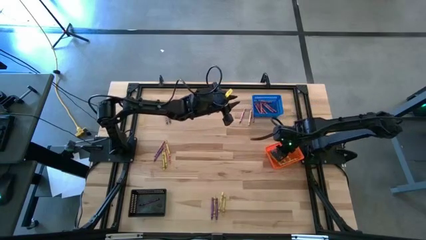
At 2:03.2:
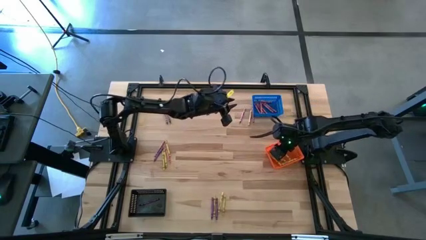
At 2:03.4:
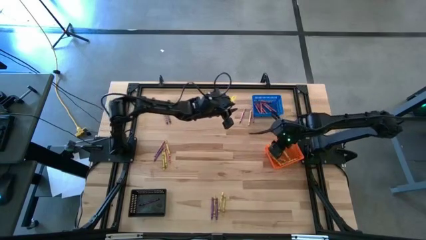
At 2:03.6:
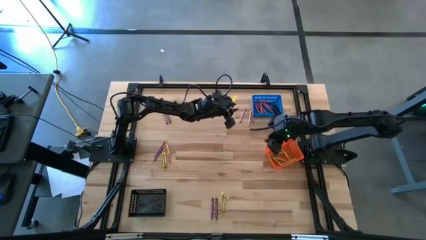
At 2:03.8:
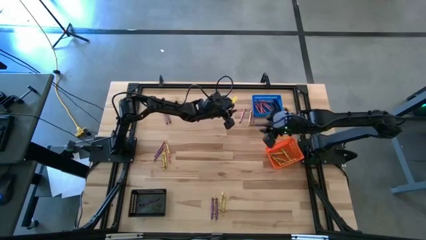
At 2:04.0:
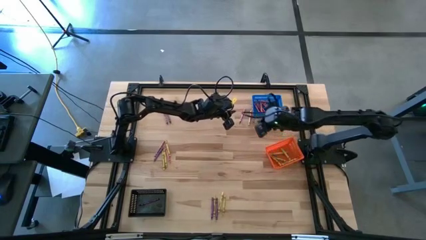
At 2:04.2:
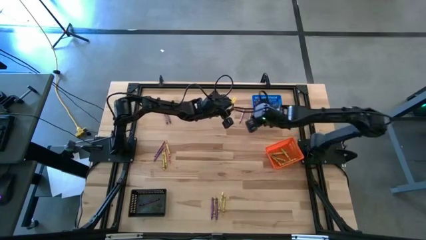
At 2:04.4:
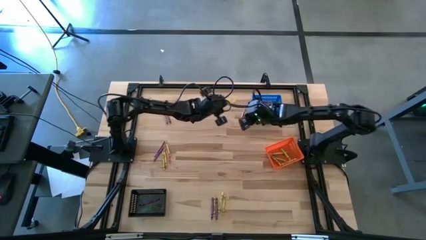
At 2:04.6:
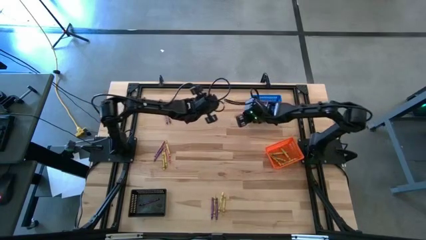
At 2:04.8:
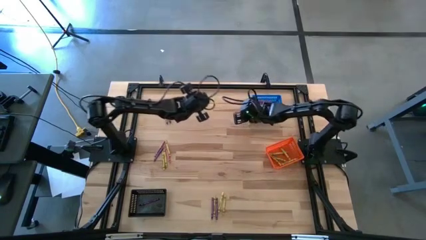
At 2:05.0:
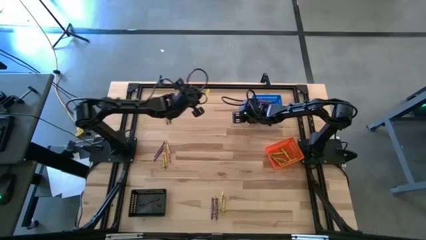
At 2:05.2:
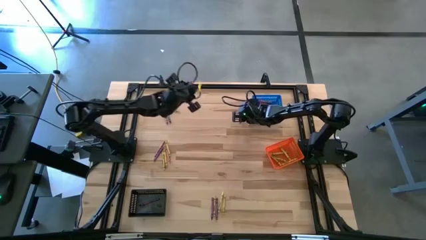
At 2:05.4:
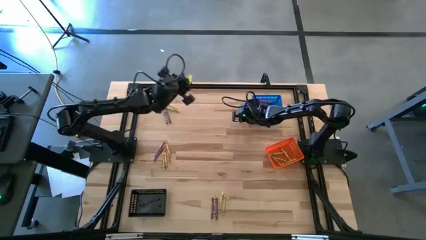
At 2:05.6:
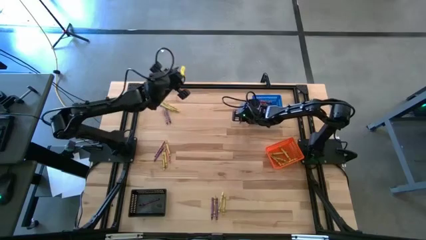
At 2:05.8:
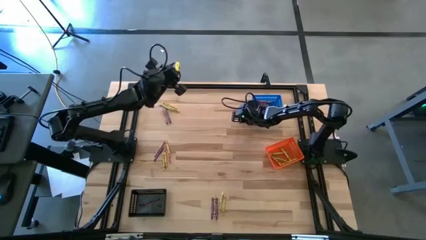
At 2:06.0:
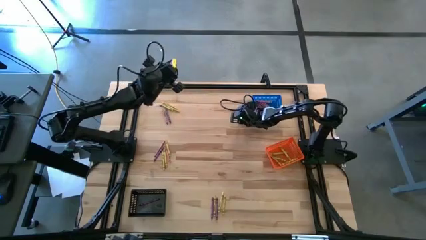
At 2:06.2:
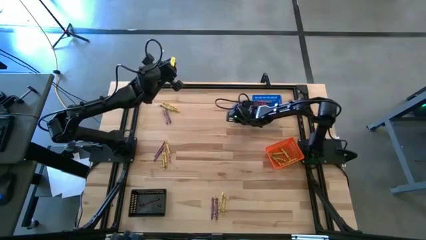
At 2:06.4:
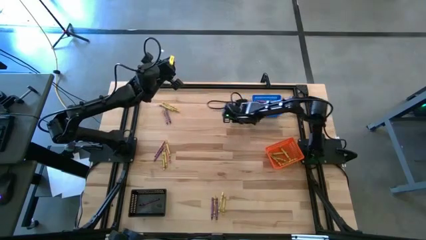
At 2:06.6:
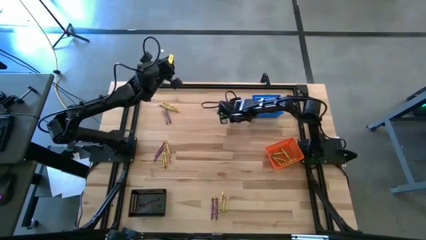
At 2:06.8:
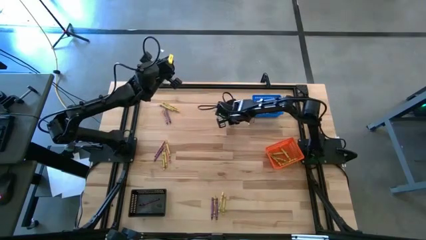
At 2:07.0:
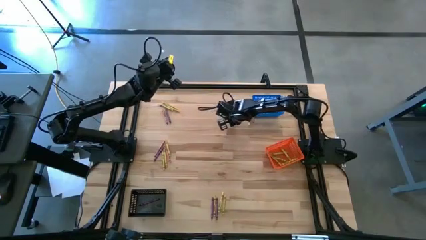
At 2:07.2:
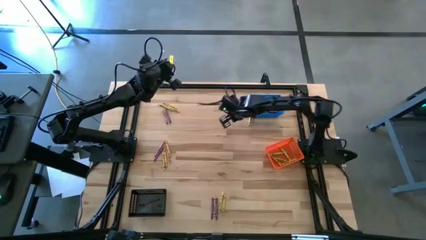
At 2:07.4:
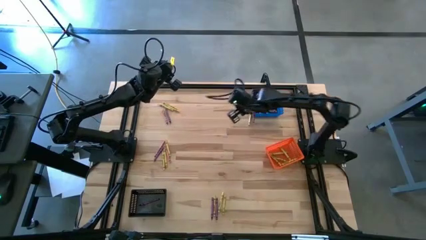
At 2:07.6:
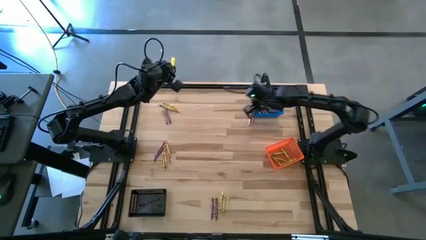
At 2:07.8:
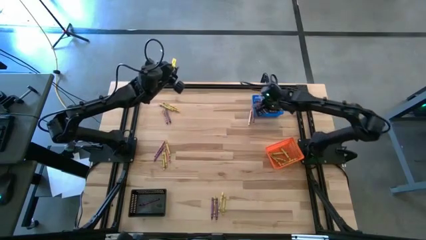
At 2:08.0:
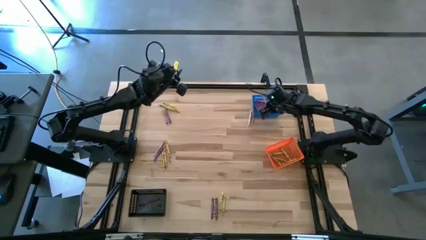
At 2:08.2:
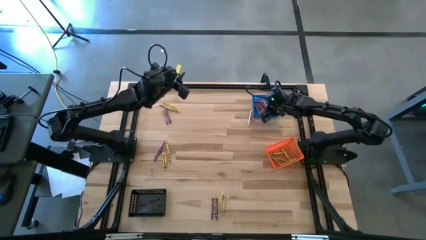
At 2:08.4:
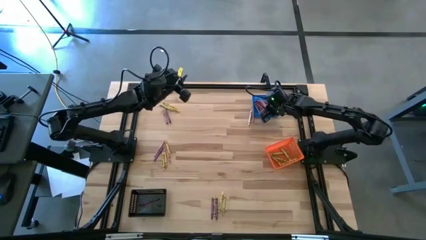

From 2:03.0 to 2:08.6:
Task: Sort crayons
Put the red crayon into the blue basket

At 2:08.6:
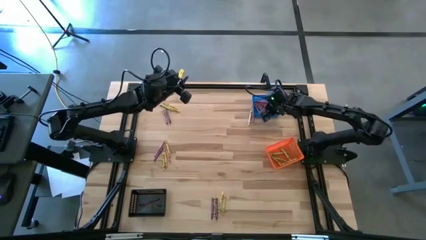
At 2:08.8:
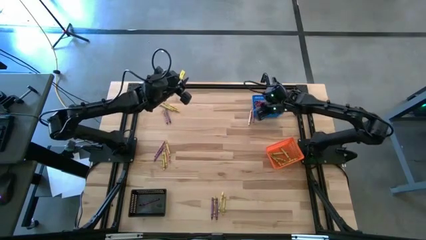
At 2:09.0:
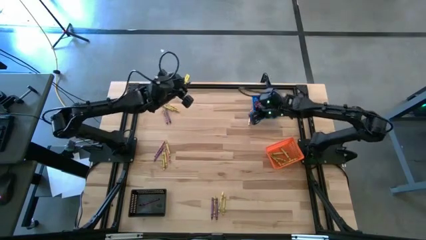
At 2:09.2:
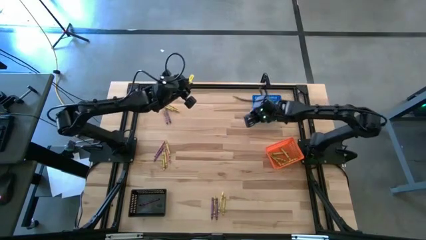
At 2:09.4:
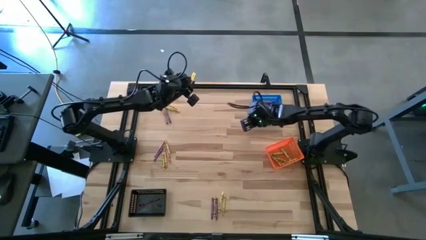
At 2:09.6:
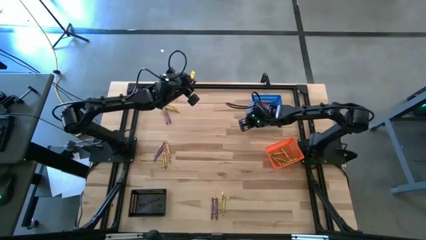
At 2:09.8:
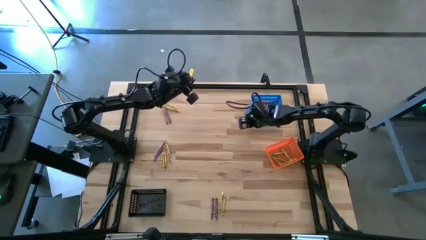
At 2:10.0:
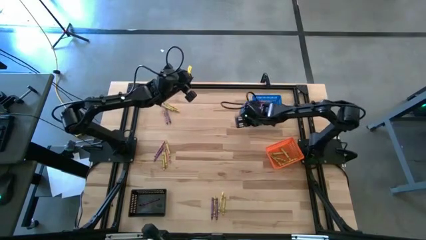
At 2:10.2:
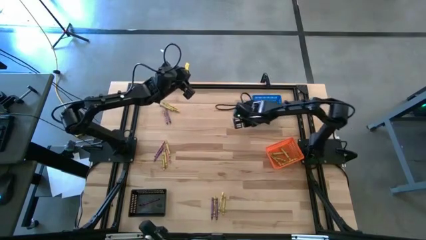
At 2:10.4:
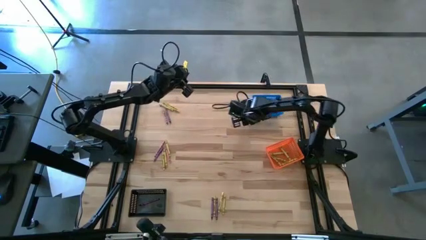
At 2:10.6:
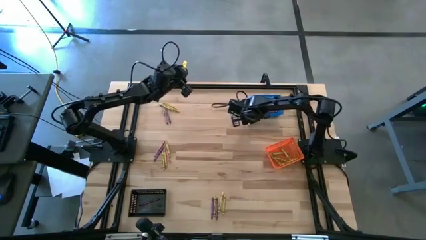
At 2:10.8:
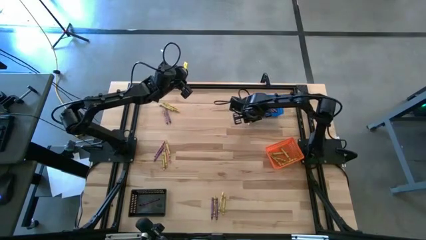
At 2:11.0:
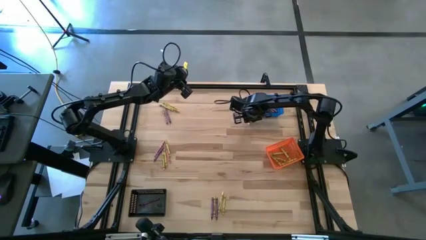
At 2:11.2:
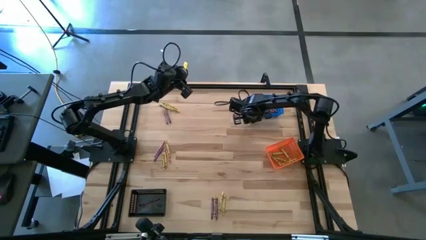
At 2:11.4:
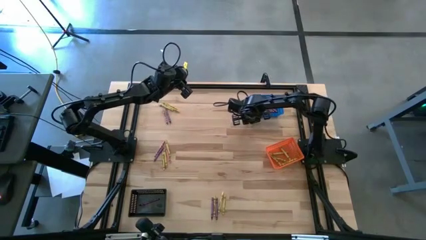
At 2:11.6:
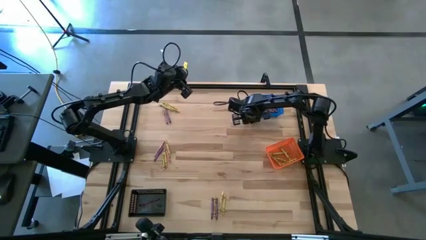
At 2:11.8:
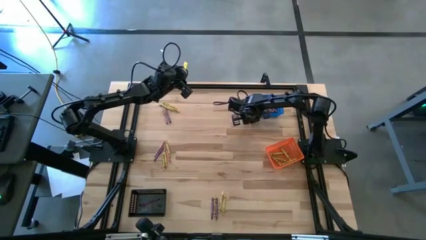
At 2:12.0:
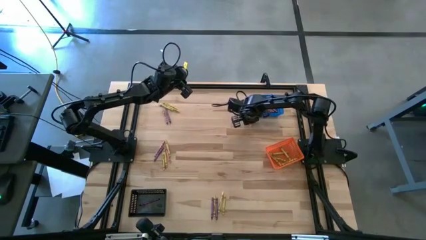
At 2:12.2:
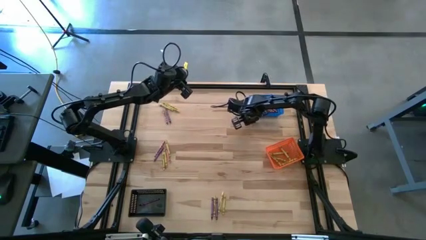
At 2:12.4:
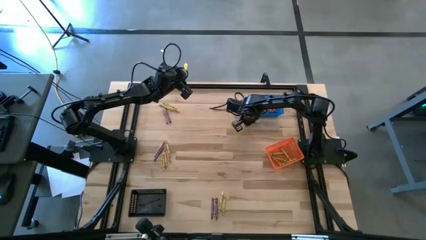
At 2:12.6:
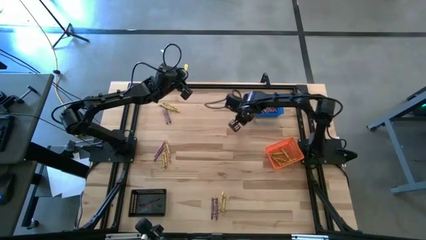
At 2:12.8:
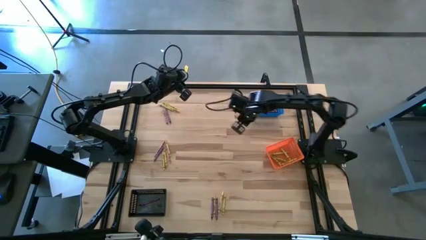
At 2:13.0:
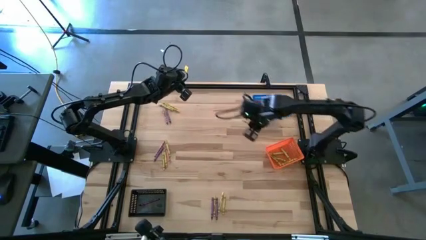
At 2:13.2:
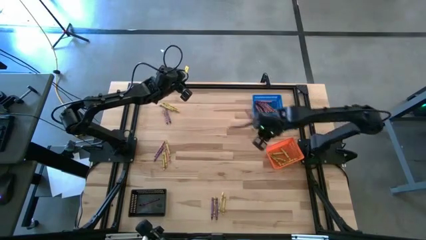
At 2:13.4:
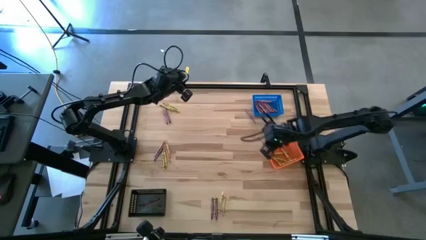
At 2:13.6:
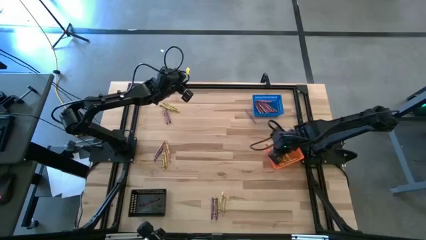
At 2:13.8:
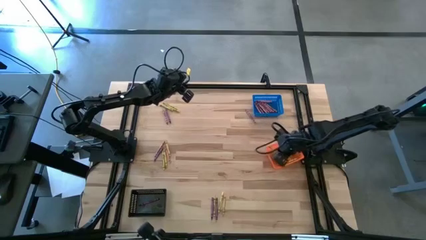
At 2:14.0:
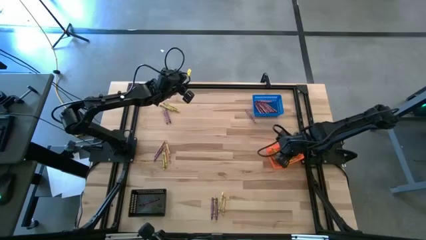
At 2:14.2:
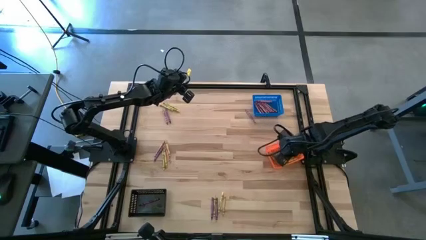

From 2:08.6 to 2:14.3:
Put the yellow crayon into the orange basket

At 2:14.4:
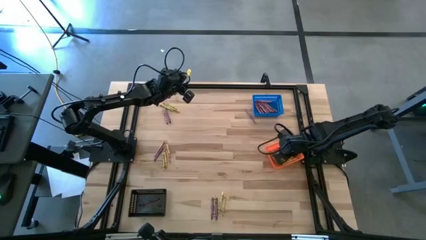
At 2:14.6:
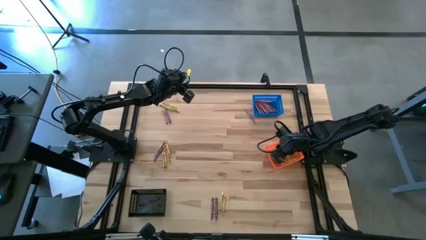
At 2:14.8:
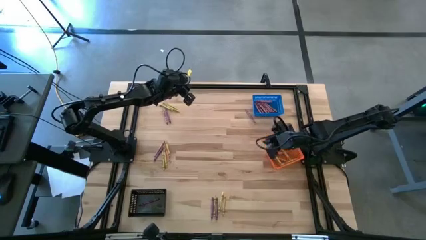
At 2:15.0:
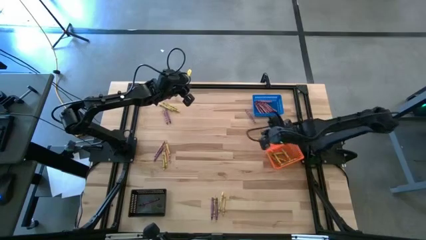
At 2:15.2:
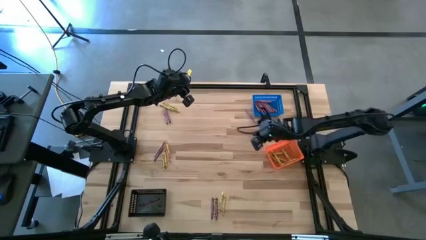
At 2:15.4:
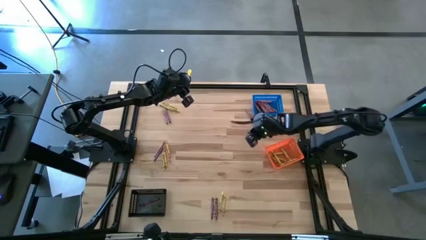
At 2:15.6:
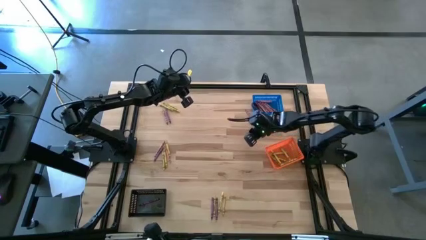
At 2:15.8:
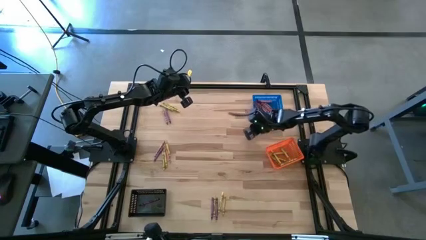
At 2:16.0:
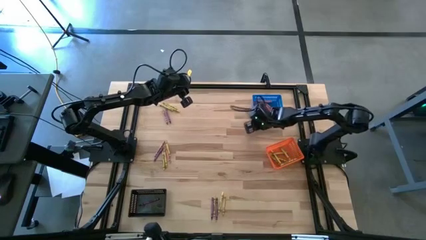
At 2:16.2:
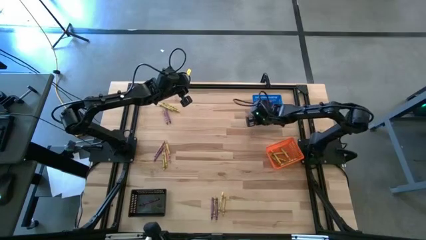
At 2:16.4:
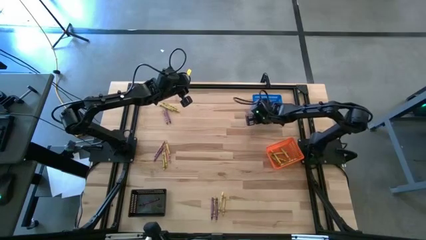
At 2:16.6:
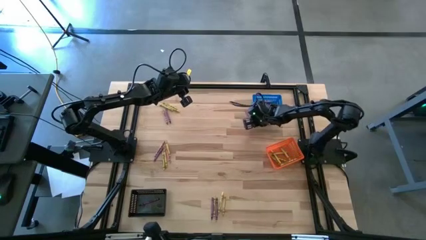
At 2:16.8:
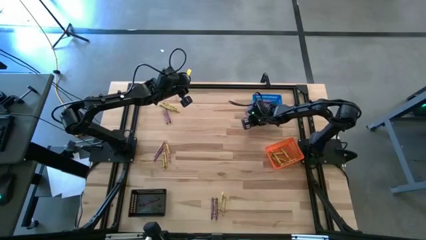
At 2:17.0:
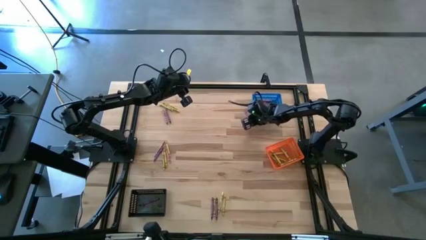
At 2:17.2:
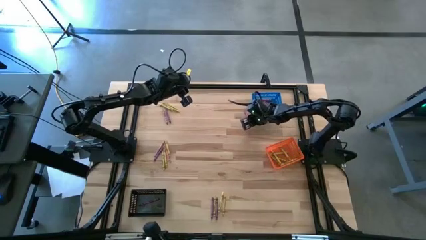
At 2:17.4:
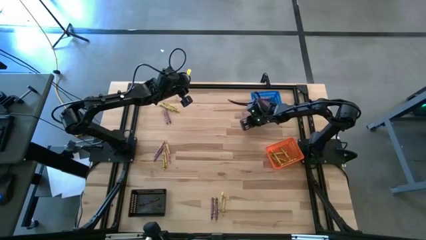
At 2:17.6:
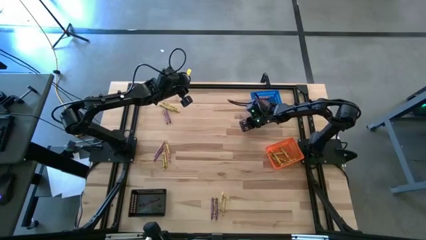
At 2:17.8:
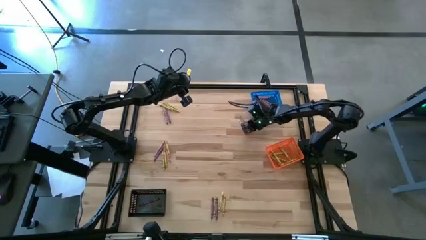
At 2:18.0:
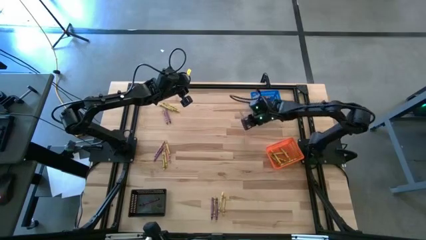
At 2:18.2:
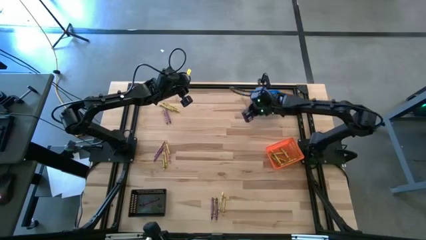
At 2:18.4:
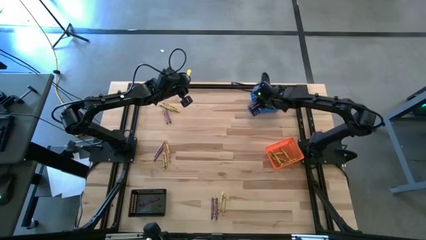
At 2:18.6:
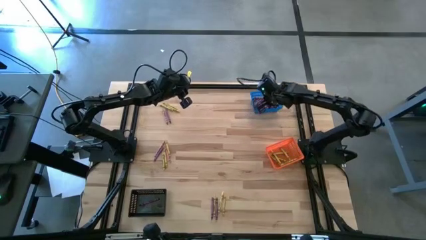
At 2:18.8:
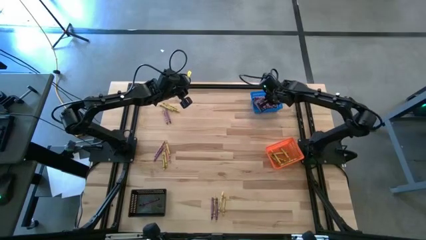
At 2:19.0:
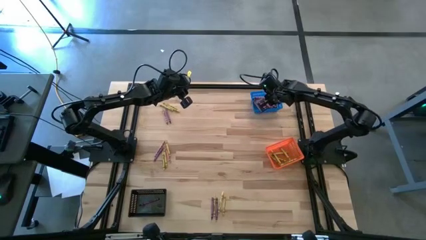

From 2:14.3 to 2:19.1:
Put the red crayon into the blue basket
